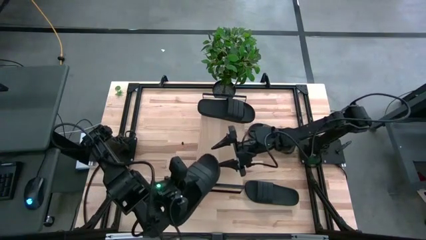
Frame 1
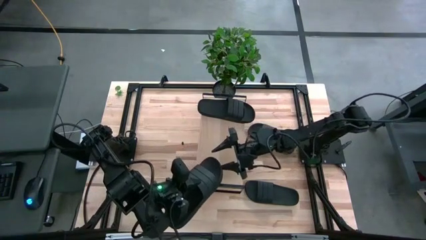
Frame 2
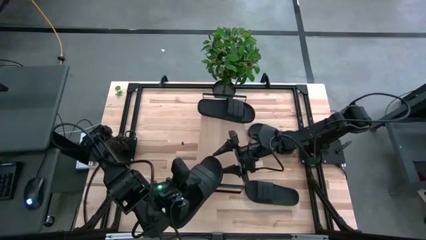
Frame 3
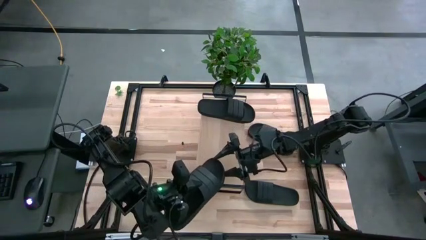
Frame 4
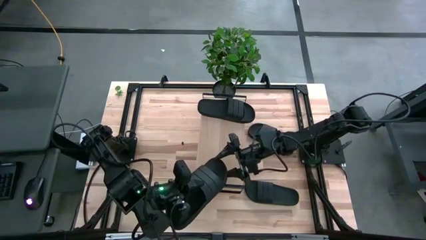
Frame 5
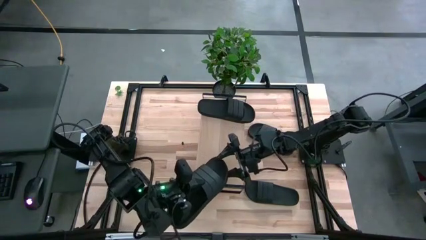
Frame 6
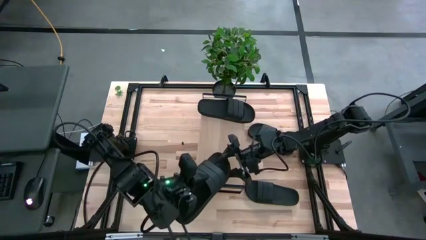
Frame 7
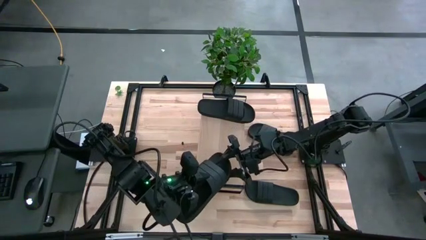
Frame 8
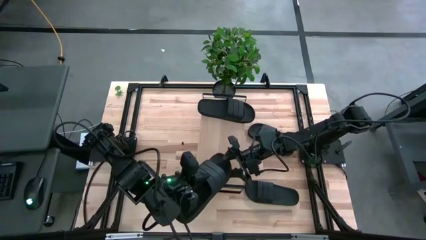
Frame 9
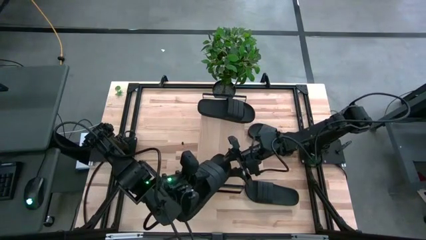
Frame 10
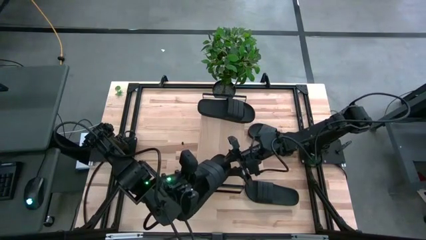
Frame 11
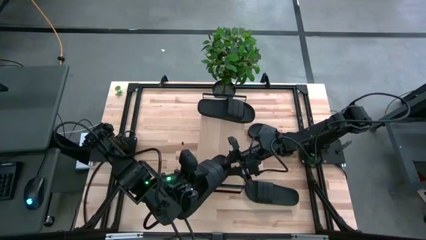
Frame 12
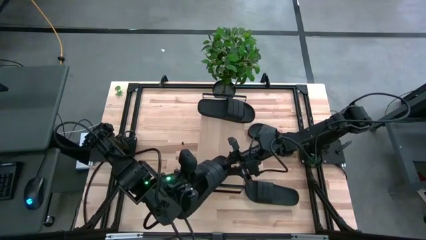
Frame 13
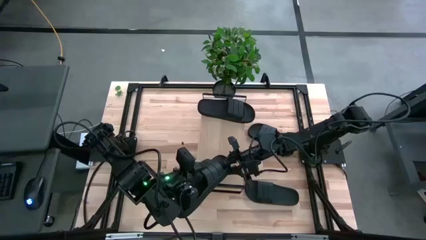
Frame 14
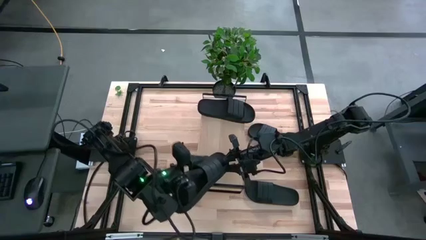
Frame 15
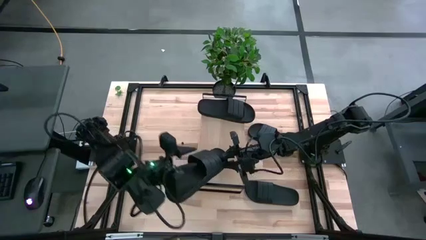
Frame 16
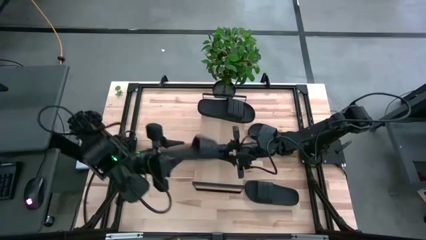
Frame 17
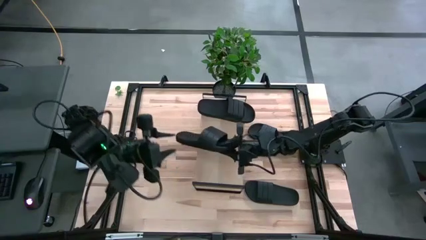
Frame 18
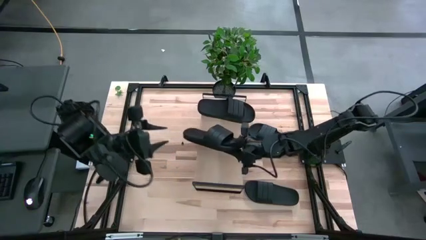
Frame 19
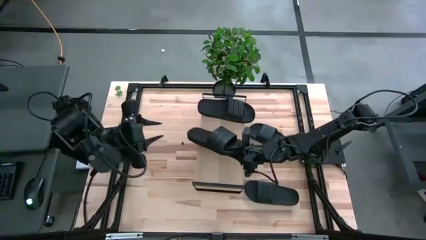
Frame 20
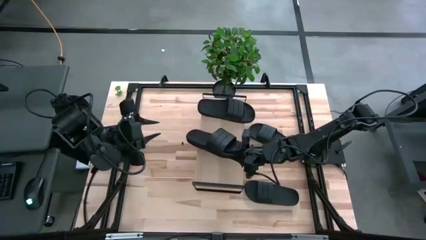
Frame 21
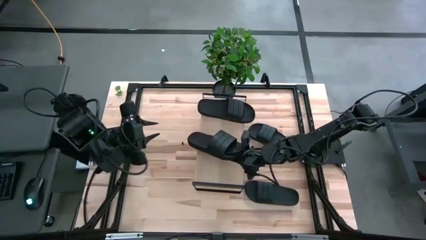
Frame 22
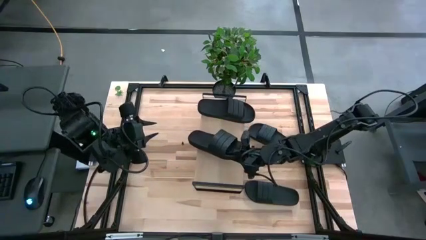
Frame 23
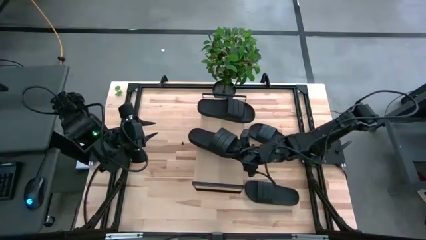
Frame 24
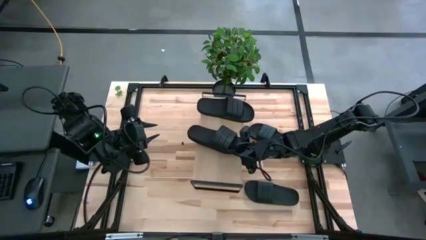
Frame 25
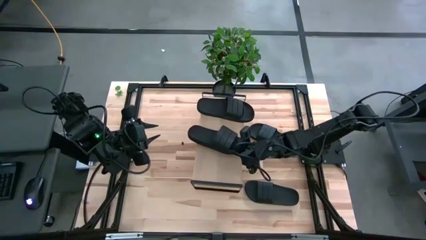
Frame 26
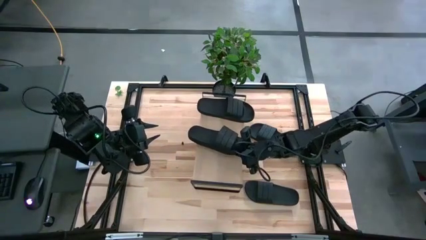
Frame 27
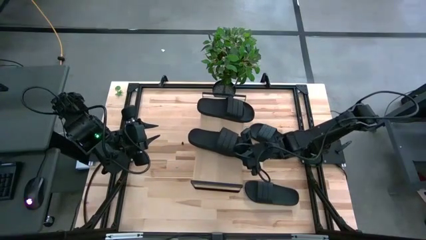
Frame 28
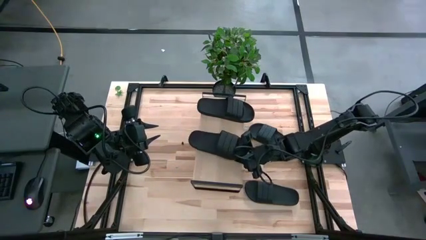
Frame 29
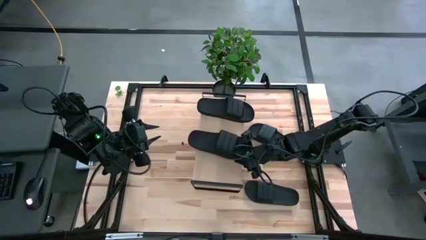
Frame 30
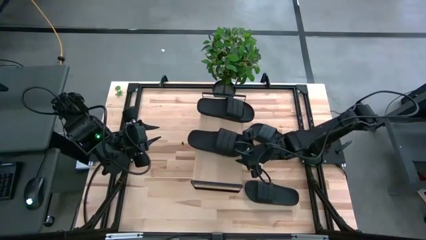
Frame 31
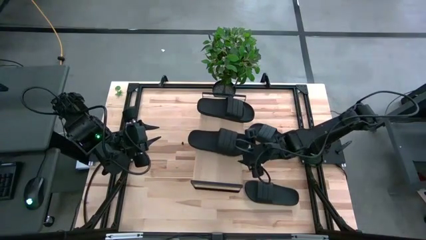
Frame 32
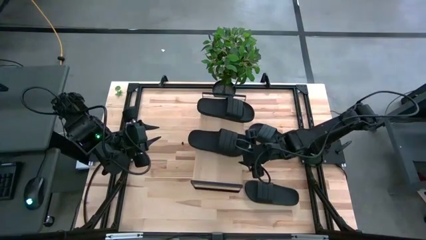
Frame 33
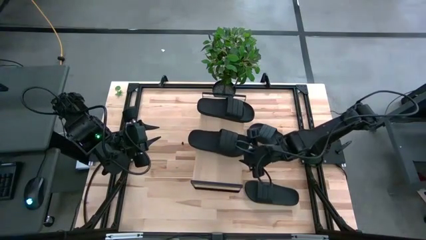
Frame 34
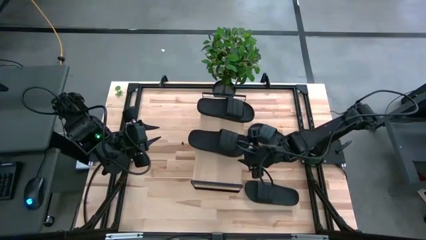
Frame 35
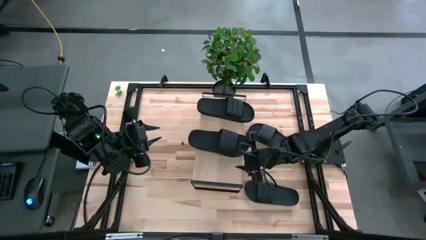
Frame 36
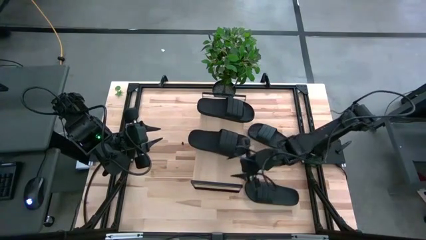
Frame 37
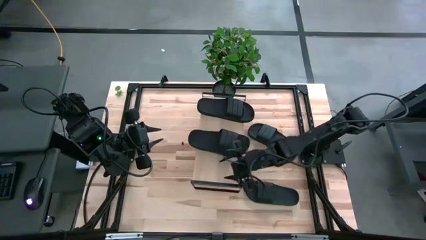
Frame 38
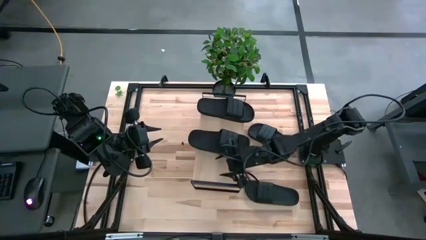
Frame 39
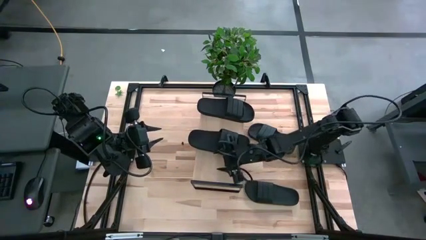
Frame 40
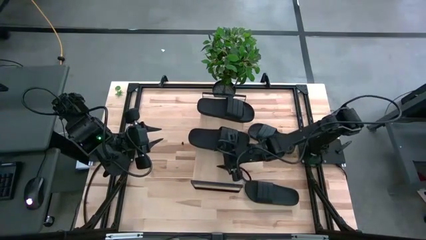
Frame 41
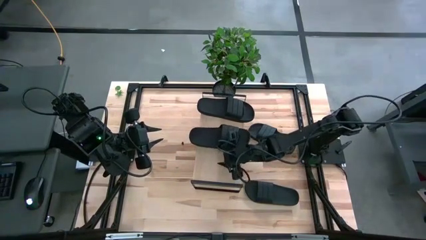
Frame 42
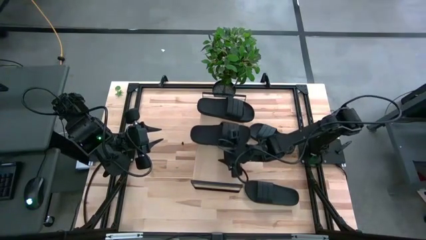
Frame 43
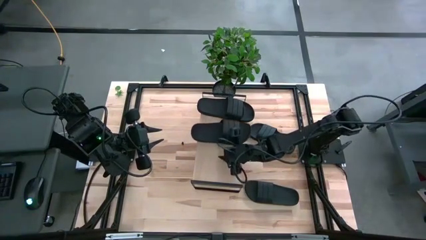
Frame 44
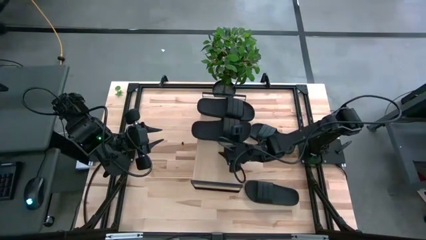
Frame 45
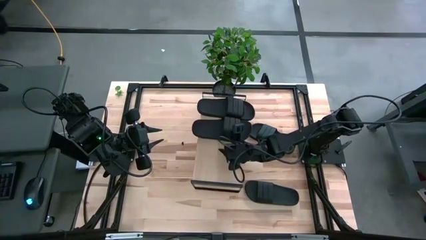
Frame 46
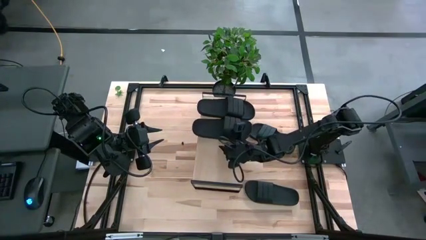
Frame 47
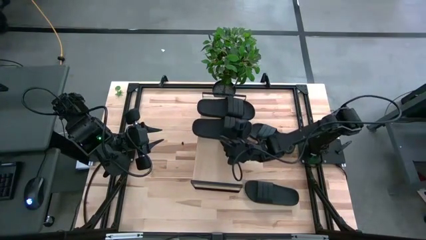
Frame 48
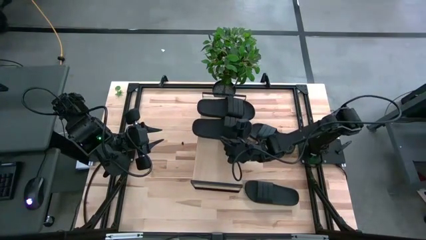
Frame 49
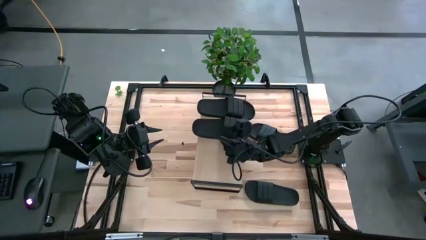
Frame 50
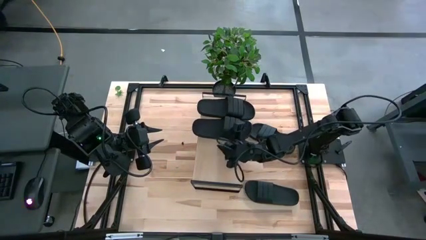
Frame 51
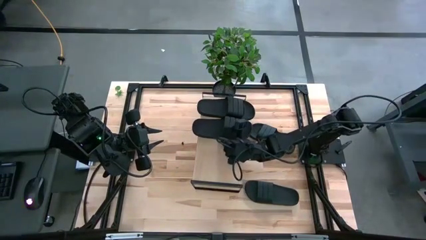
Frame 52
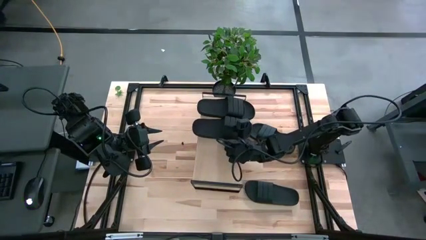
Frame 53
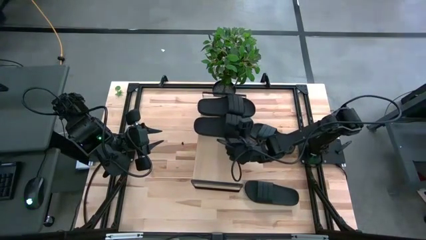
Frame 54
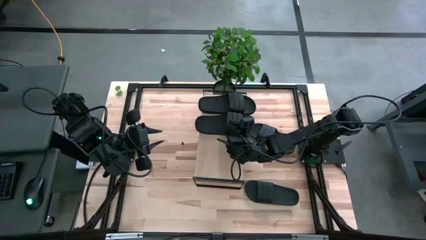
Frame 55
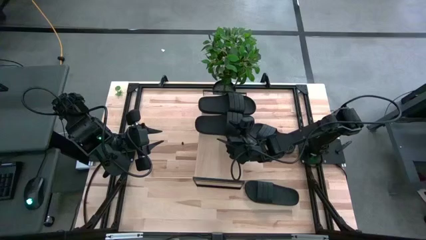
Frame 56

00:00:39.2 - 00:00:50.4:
Task: Pick and place slides into the shelf
Put the bottom left slide on the shelf
